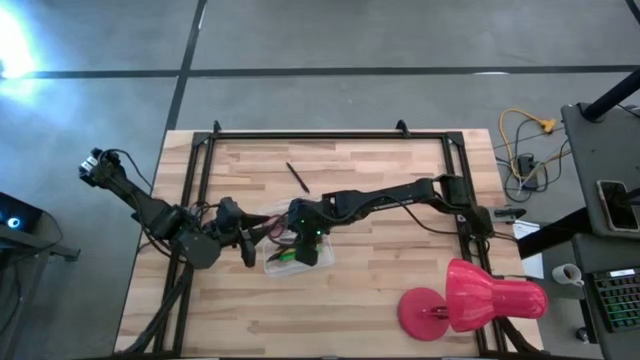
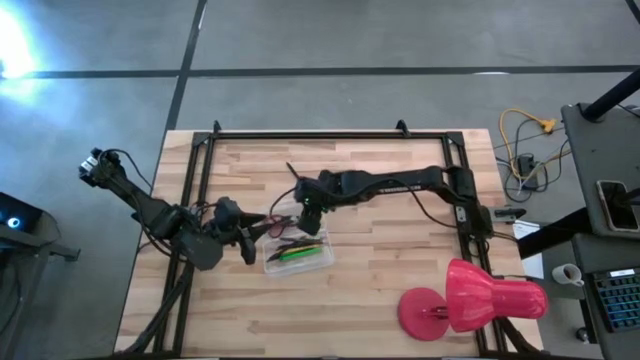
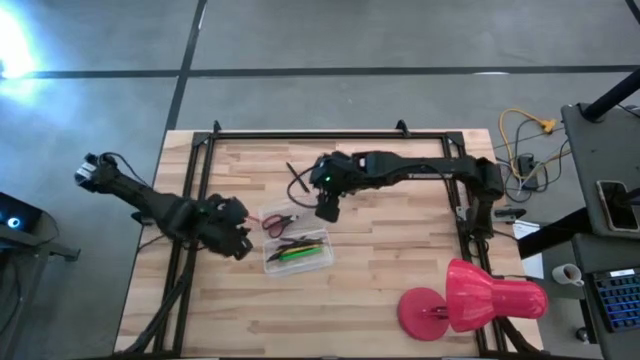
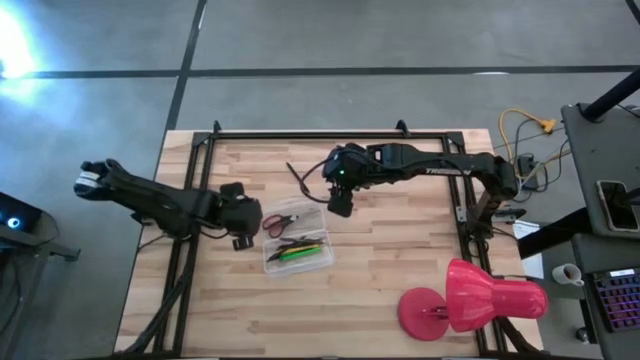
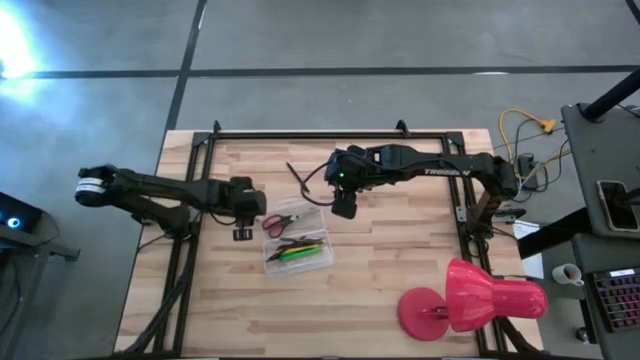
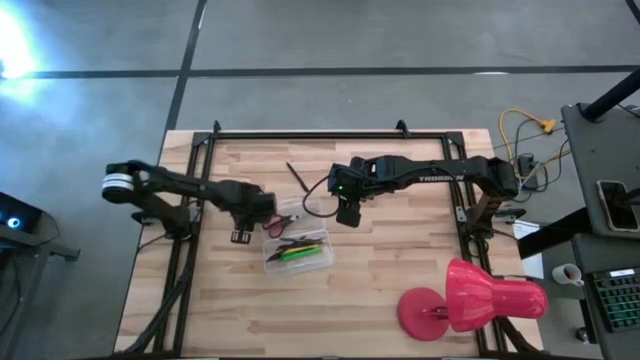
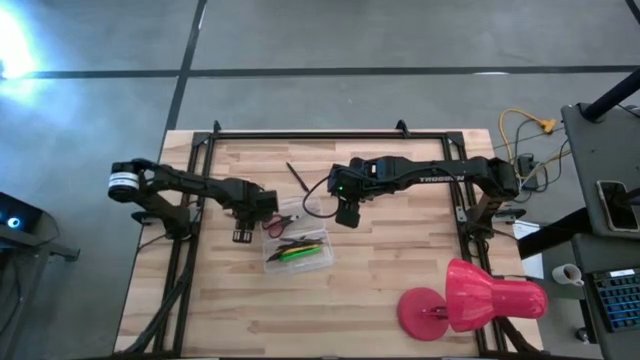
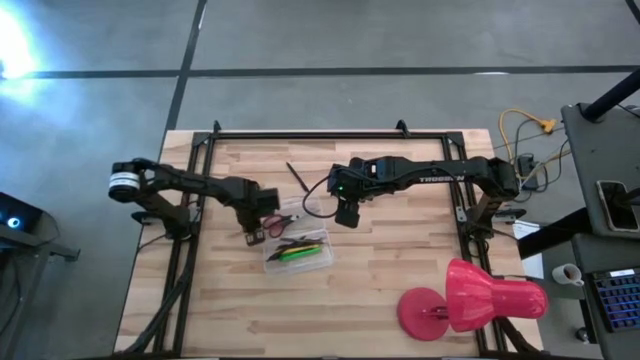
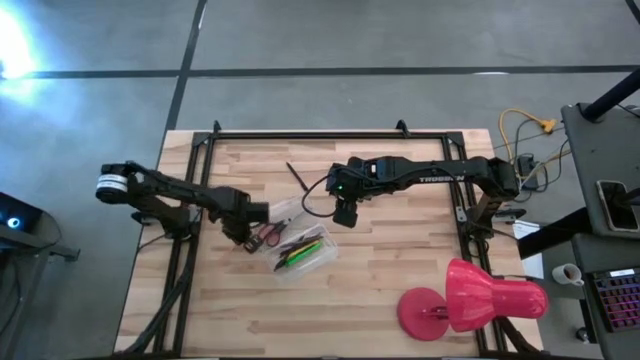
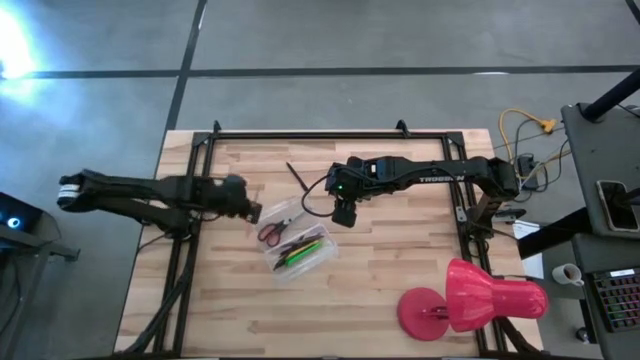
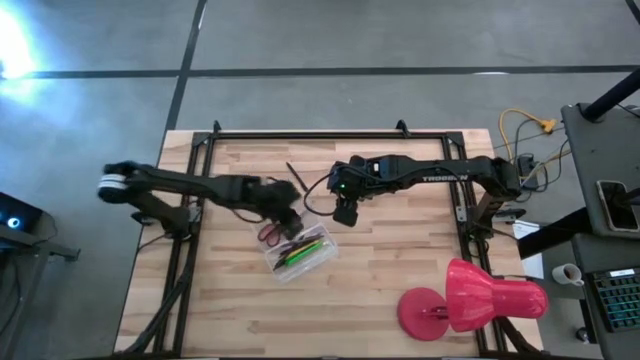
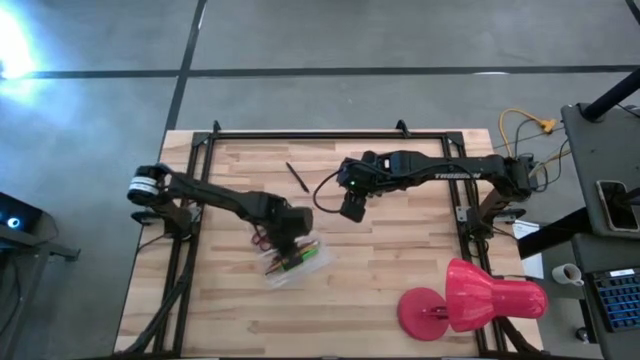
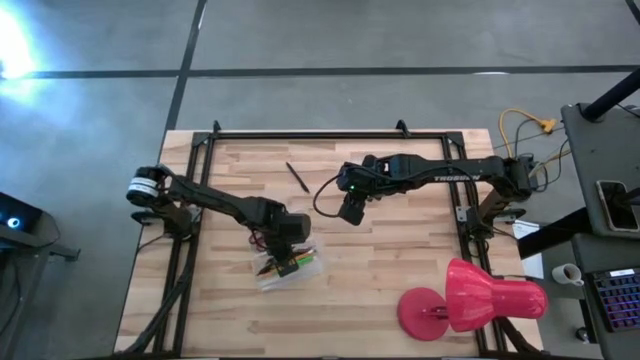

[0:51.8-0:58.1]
Task: Pick & place school supplies into a supply box
Put the orange pencil into the stationery box

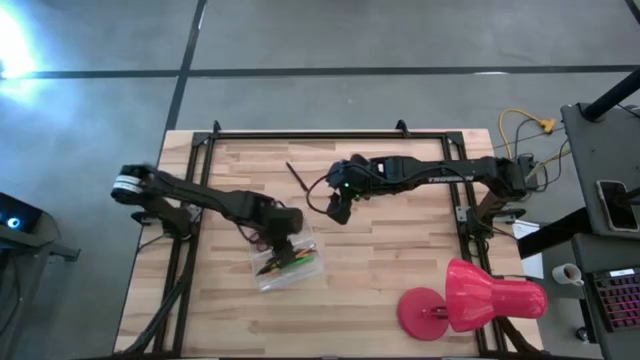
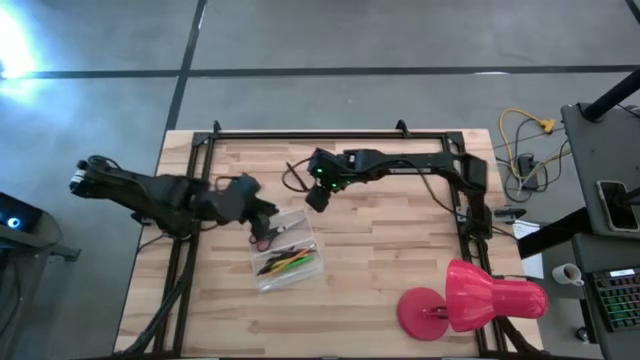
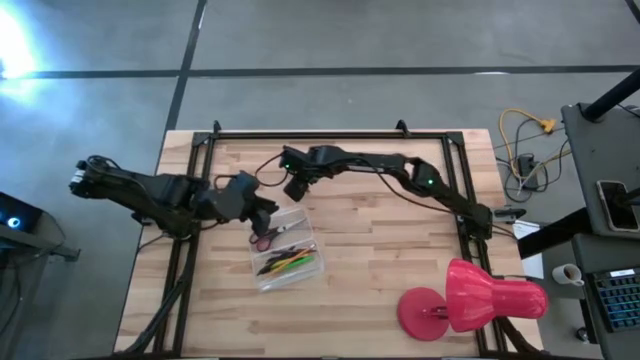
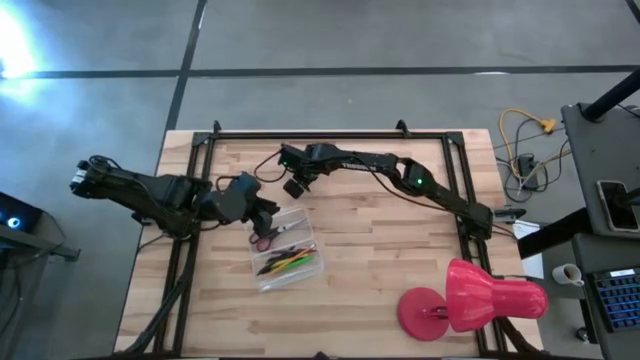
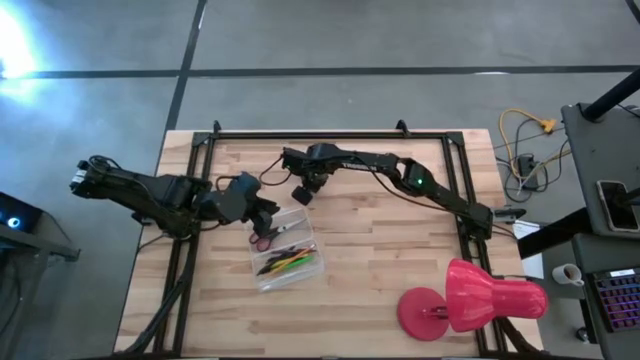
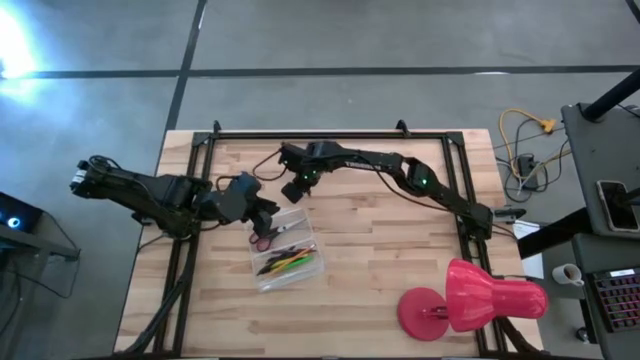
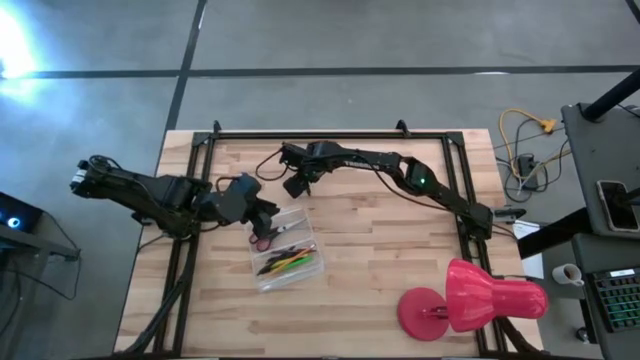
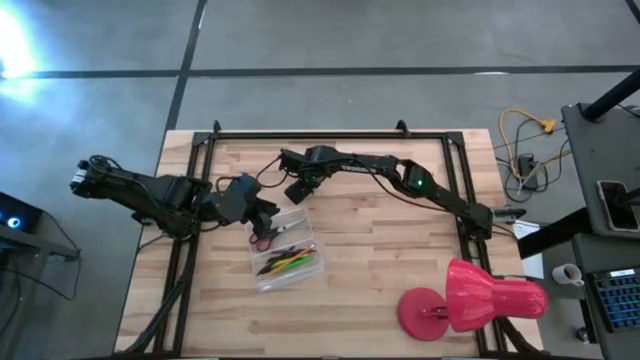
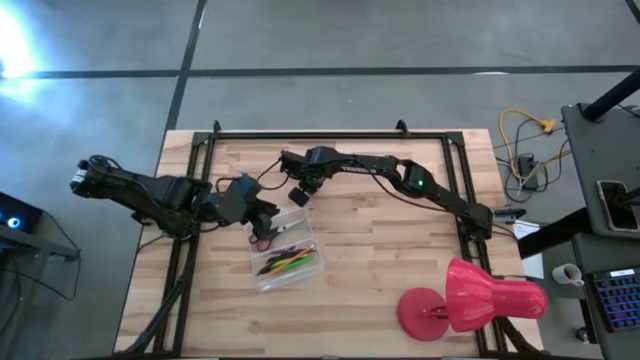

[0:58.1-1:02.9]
Put the black pen into the stationery box

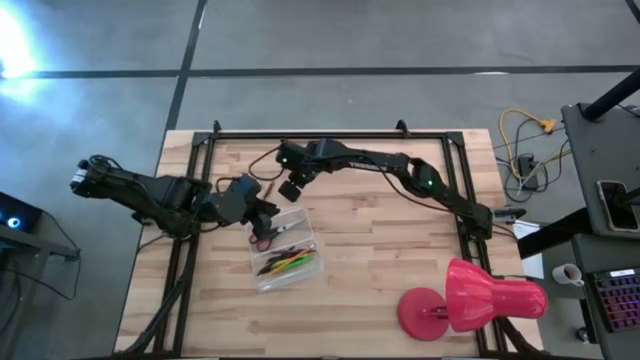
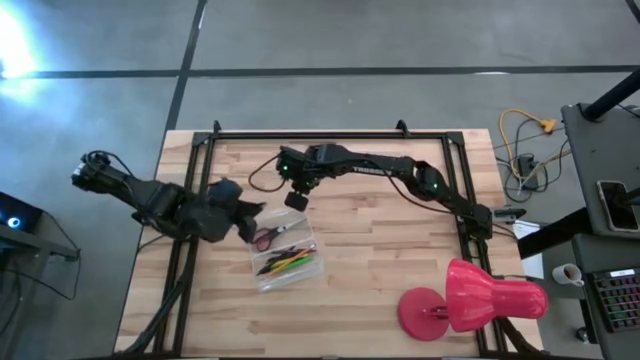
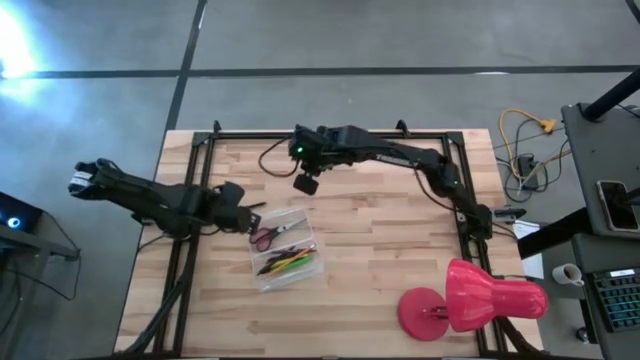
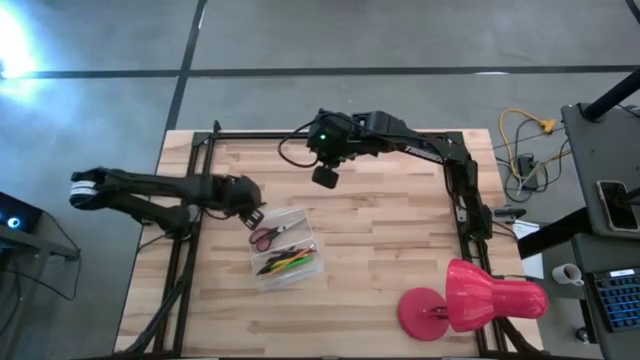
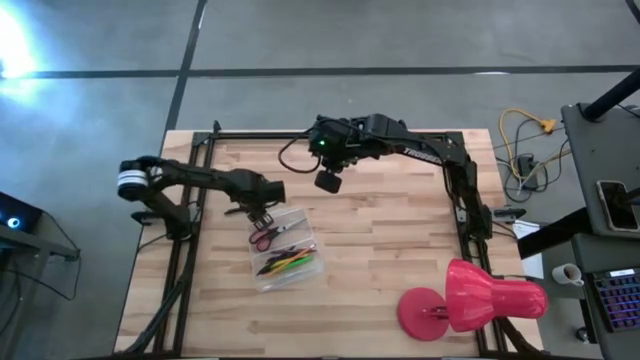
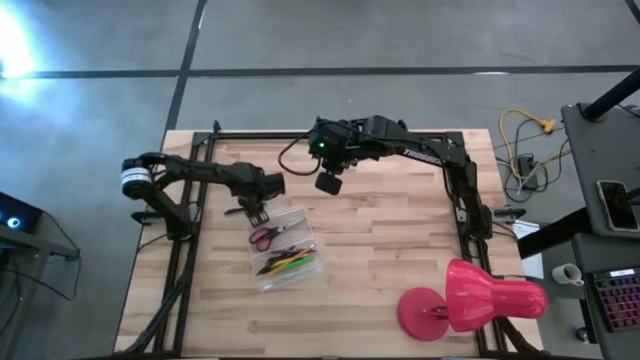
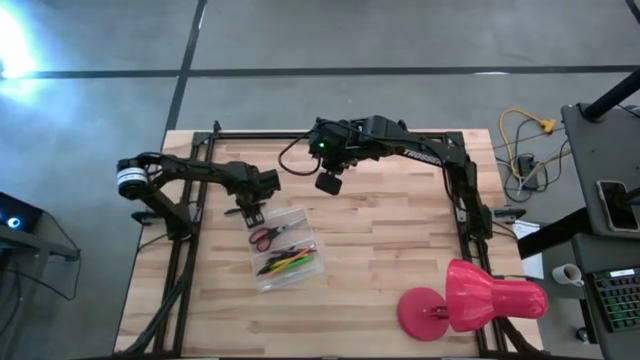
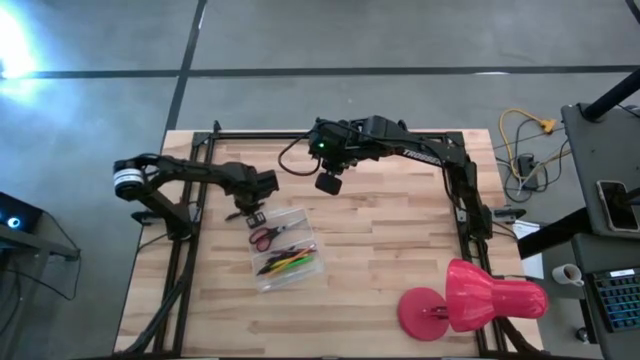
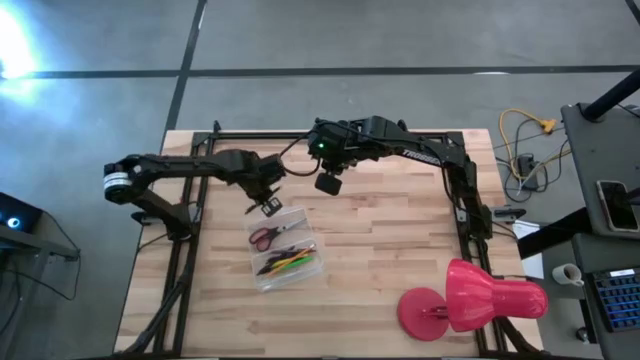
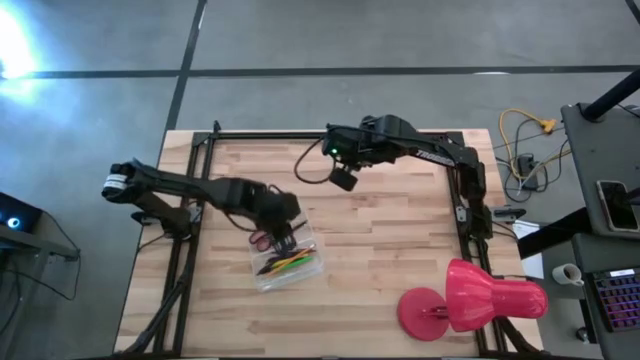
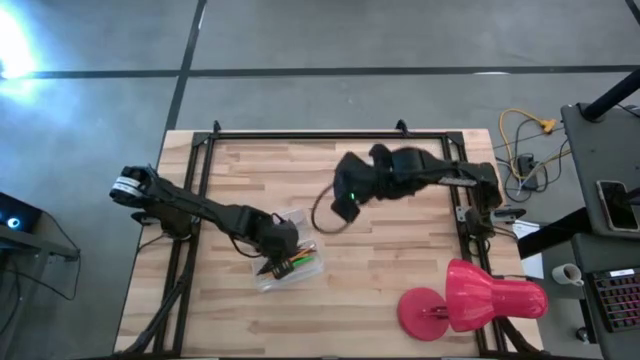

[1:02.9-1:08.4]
Put the black pen into the stationery box
